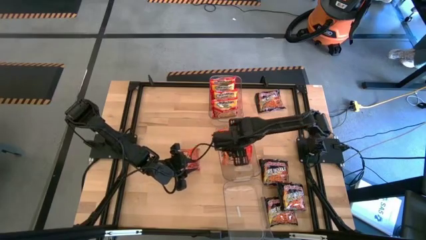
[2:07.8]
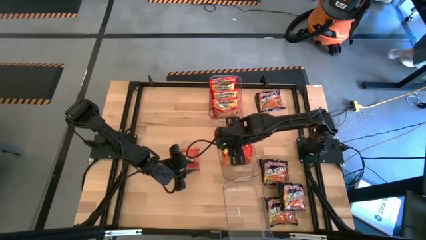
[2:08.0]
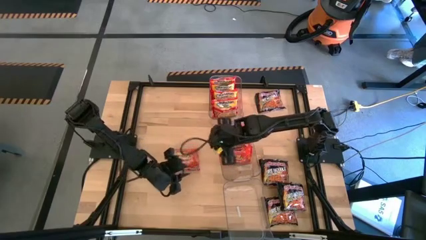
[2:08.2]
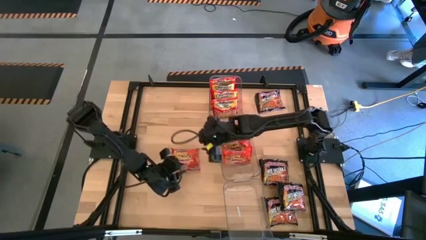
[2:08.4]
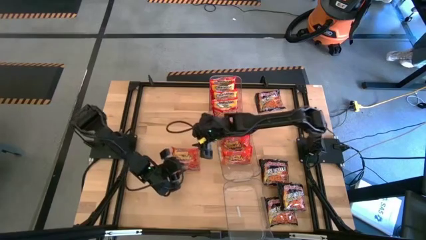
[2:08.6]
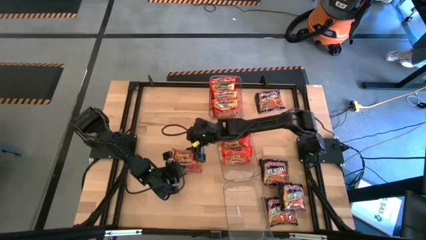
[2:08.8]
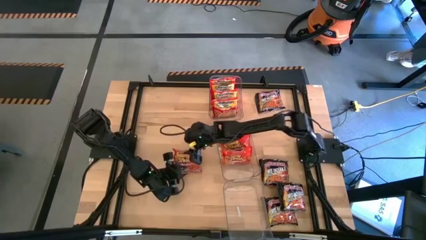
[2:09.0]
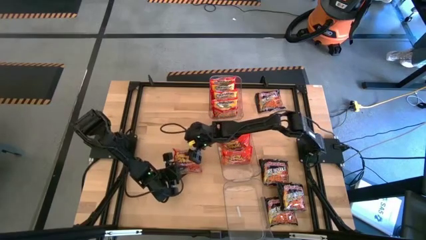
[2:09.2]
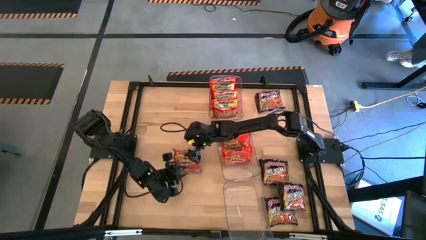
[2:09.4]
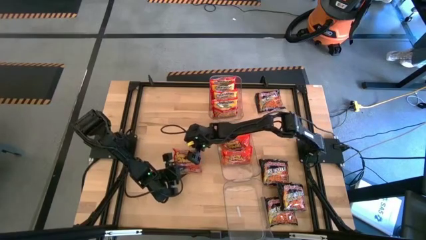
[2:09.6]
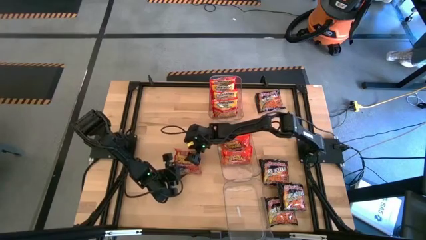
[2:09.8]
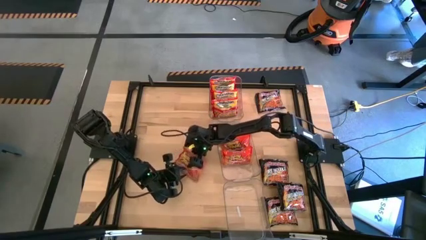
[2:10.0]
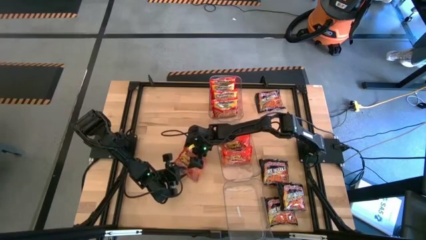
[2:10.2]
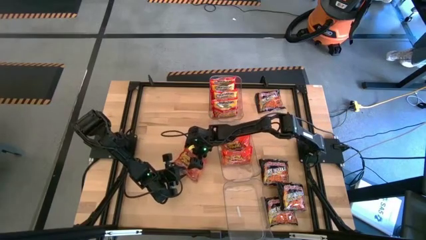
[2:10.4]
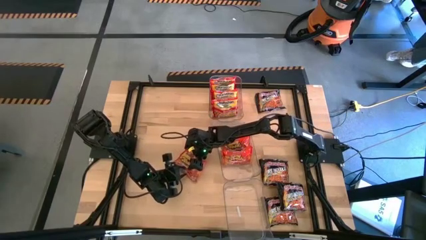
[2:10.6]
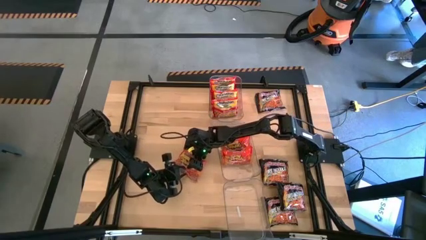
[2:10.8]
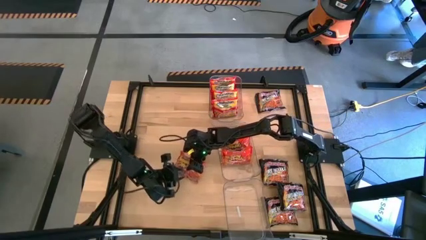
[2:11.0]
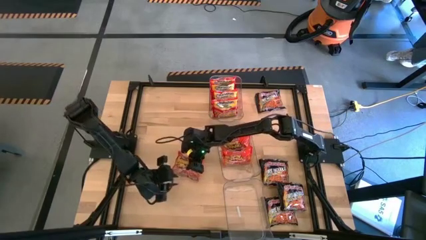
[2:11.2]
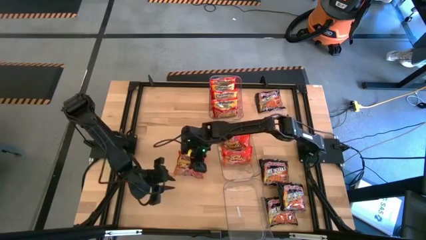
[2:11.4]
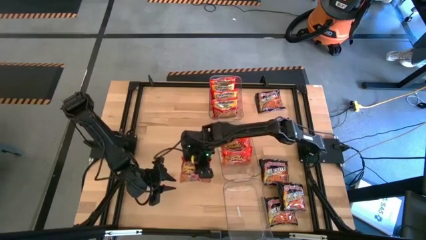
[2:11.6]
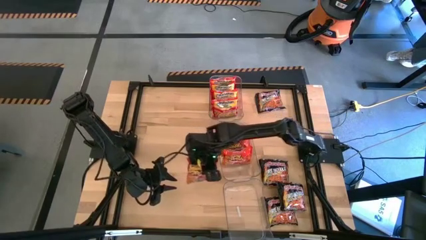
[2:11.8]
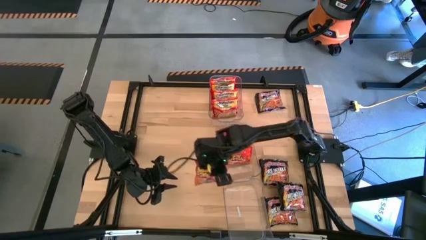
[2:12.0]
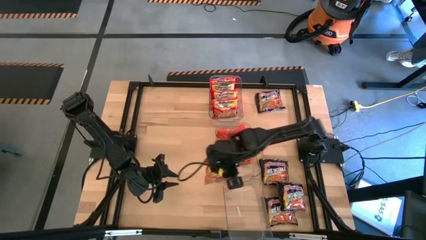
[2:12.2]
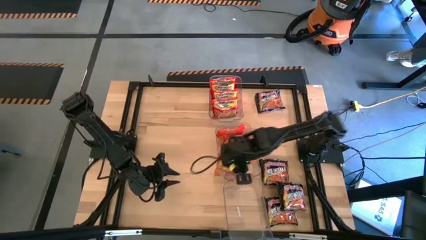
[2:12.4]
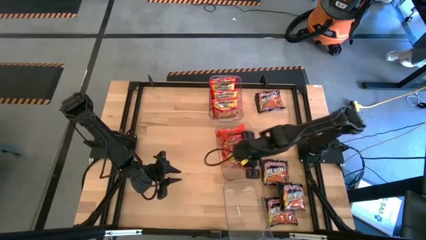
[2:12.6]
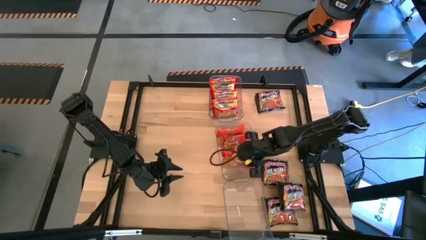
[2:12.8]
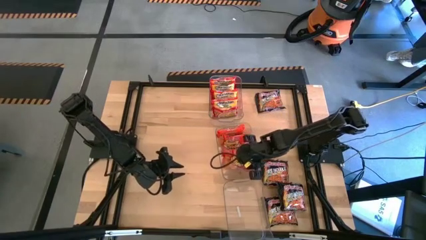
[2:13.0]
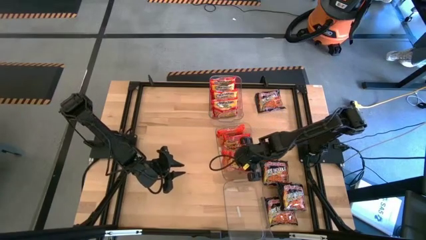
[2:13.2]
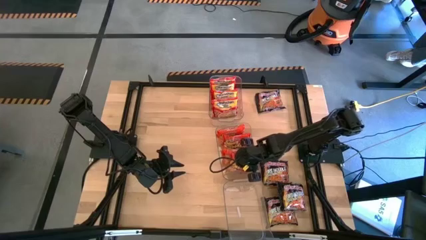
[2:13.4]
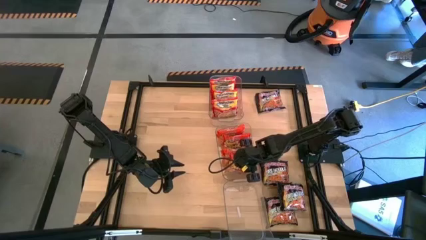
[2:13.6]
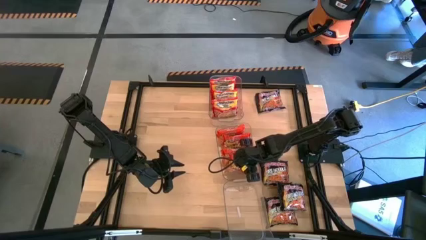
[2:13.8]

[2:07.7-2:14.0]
Task: Sort Maruchan noodles
Put the orange noodle pack into the middle transparent bin

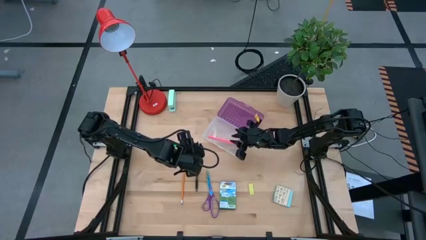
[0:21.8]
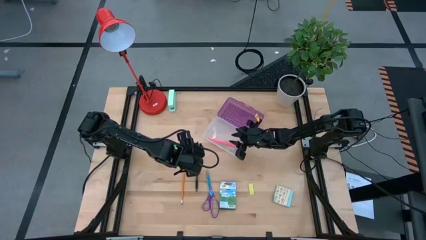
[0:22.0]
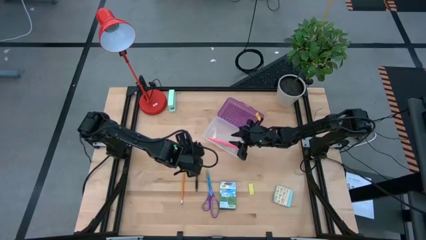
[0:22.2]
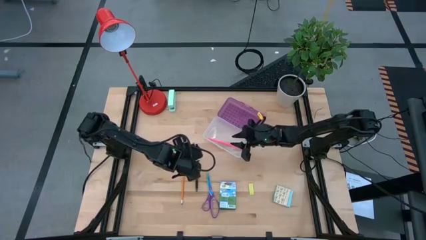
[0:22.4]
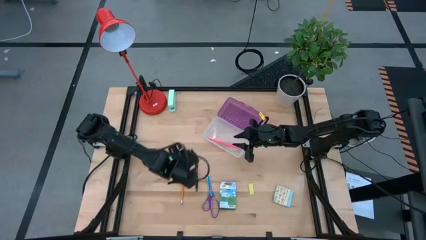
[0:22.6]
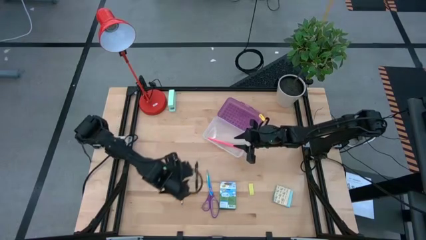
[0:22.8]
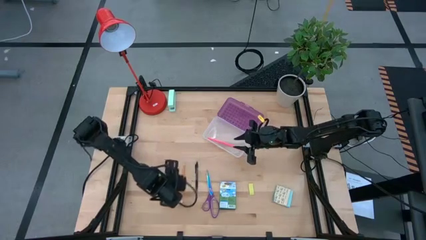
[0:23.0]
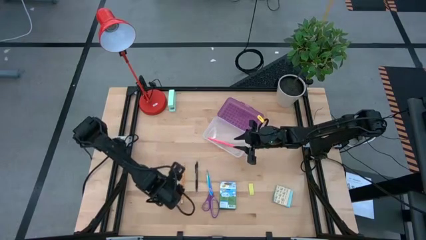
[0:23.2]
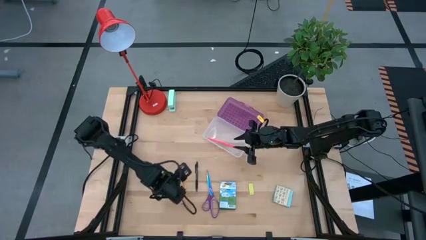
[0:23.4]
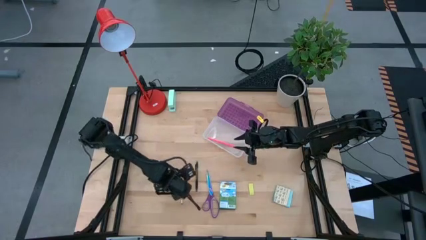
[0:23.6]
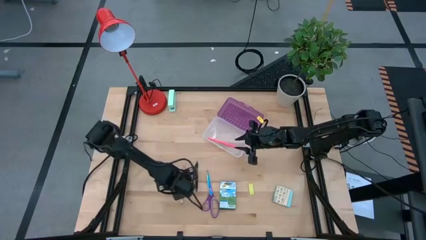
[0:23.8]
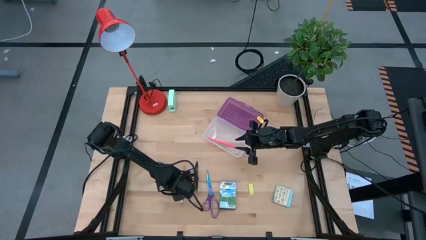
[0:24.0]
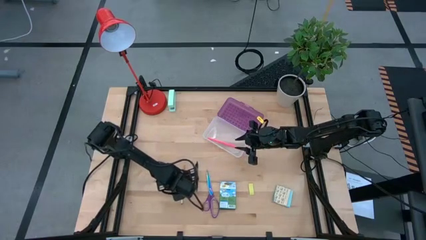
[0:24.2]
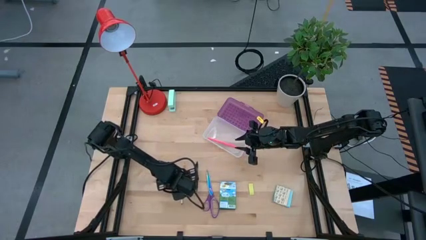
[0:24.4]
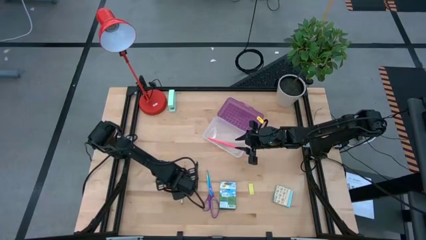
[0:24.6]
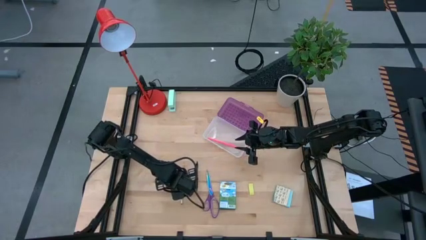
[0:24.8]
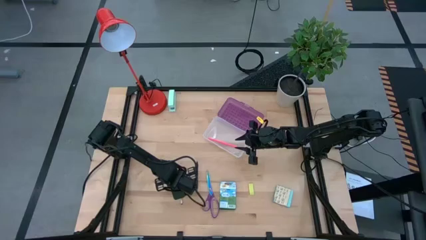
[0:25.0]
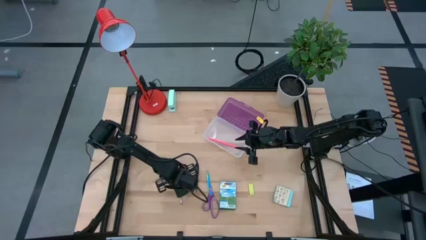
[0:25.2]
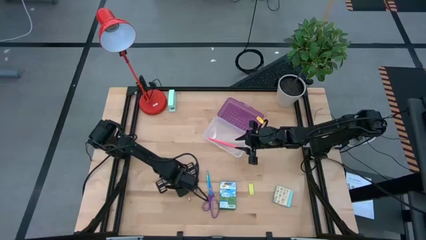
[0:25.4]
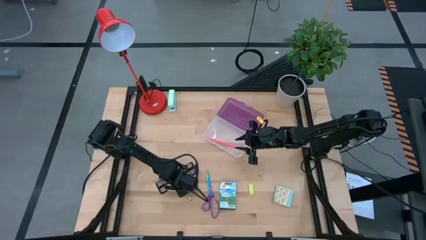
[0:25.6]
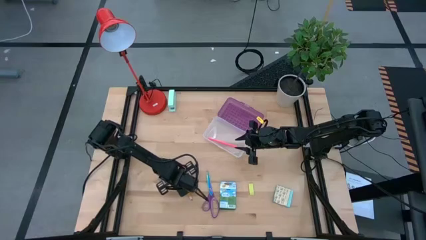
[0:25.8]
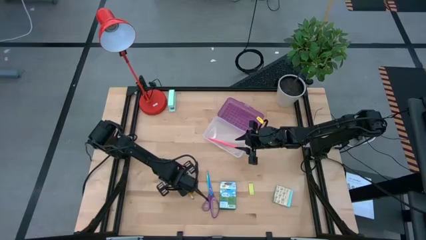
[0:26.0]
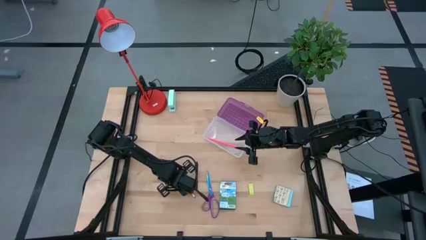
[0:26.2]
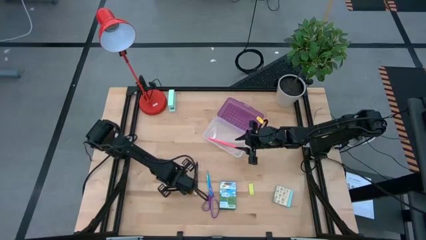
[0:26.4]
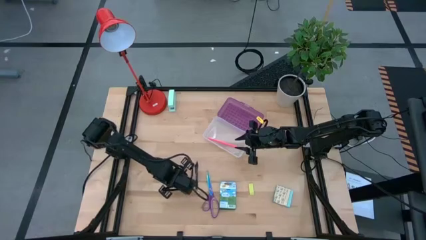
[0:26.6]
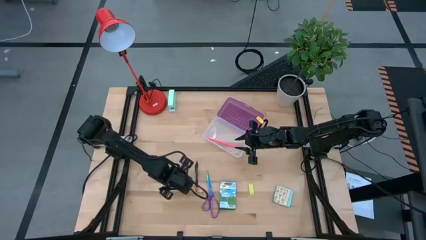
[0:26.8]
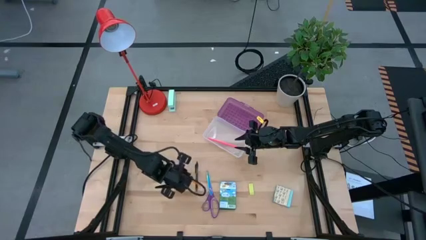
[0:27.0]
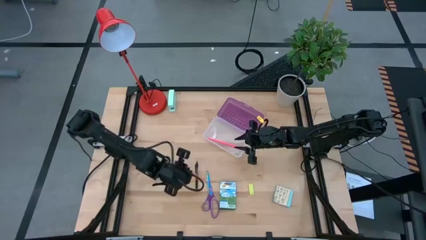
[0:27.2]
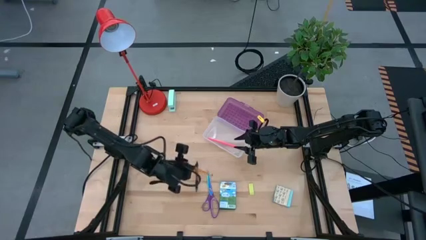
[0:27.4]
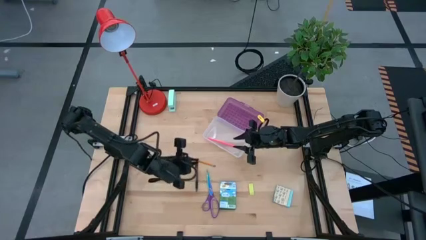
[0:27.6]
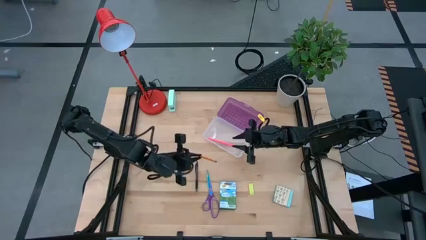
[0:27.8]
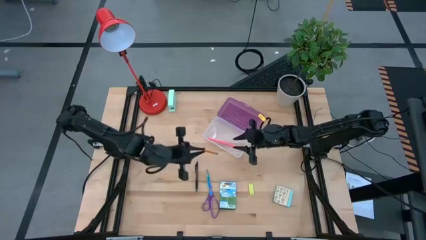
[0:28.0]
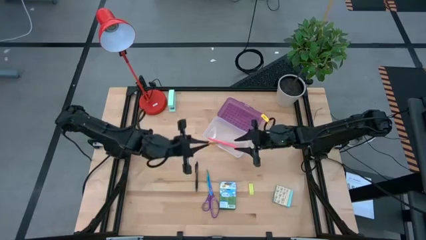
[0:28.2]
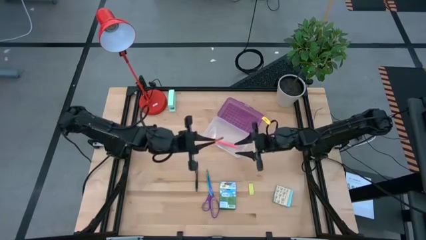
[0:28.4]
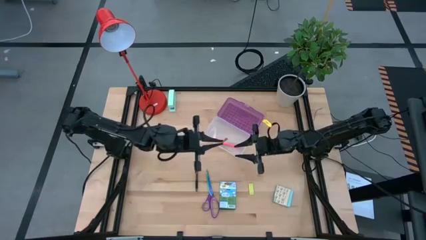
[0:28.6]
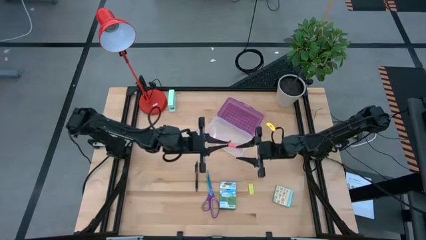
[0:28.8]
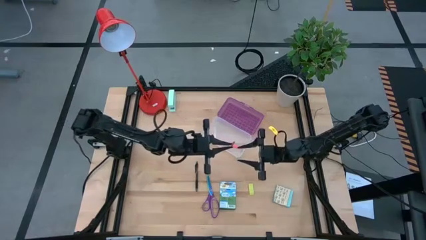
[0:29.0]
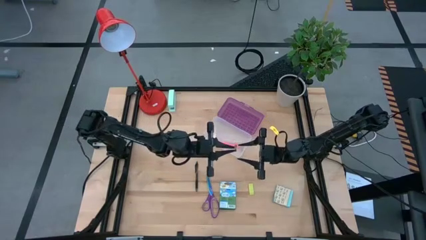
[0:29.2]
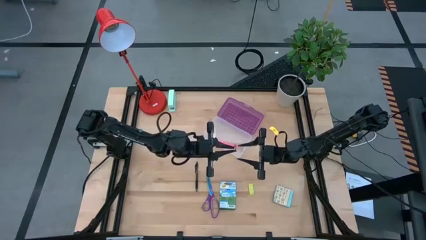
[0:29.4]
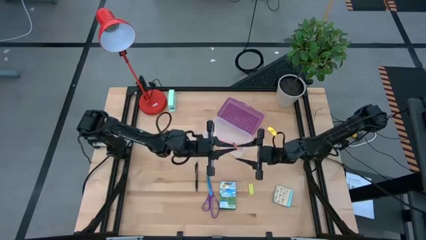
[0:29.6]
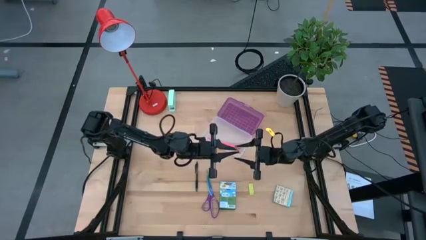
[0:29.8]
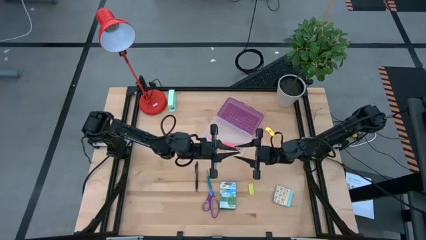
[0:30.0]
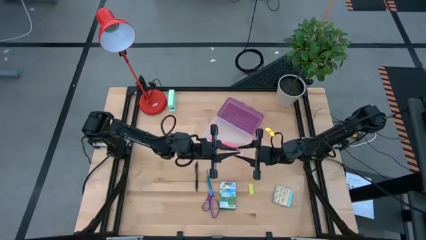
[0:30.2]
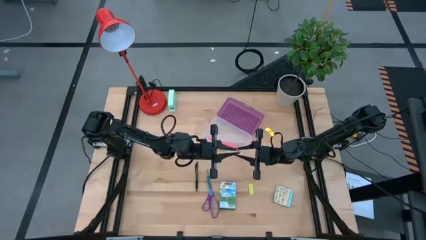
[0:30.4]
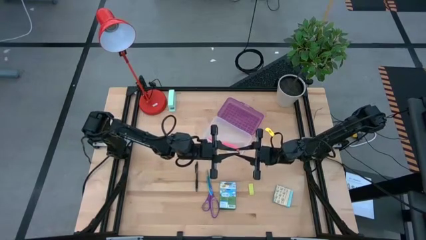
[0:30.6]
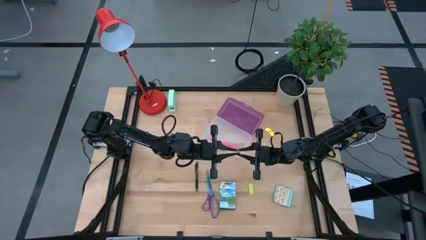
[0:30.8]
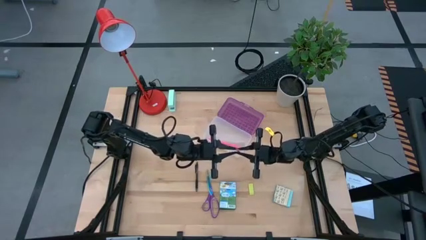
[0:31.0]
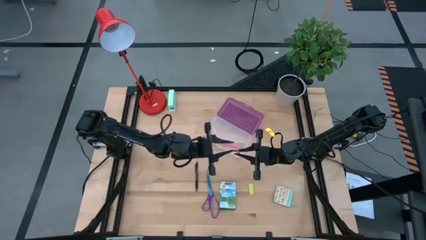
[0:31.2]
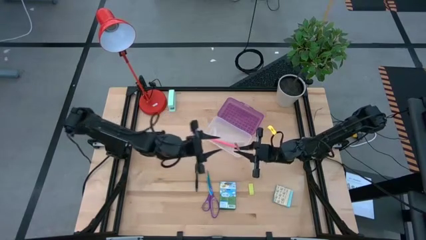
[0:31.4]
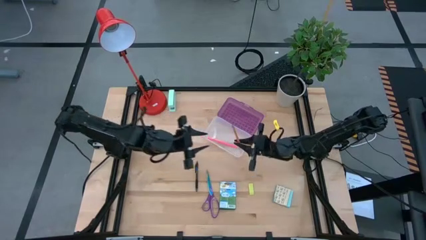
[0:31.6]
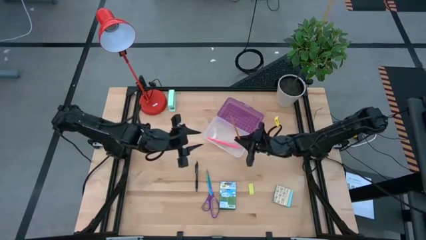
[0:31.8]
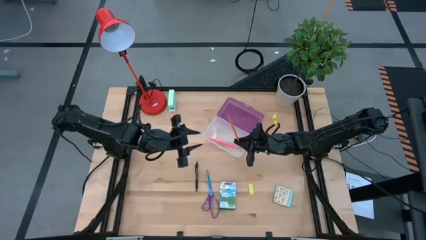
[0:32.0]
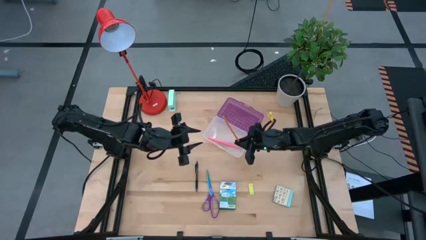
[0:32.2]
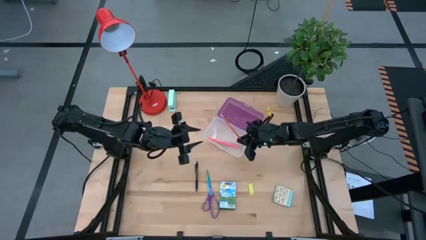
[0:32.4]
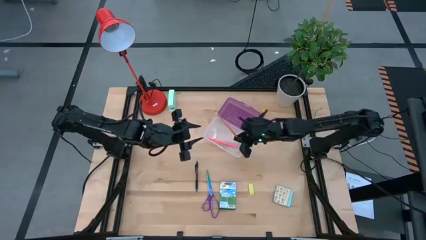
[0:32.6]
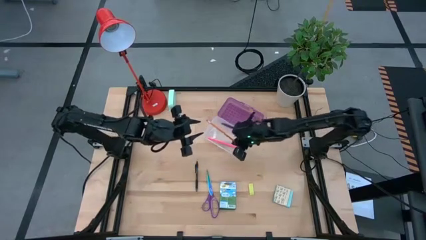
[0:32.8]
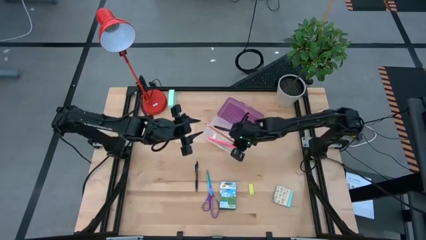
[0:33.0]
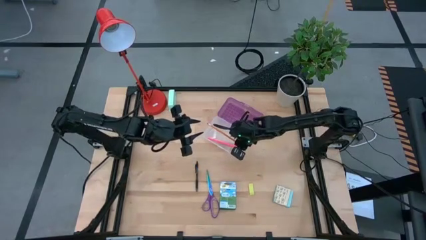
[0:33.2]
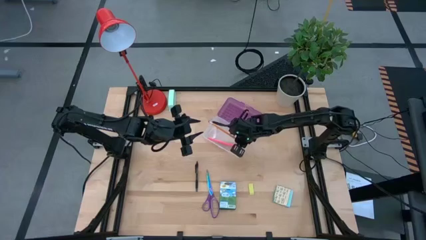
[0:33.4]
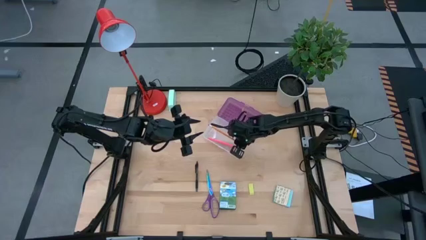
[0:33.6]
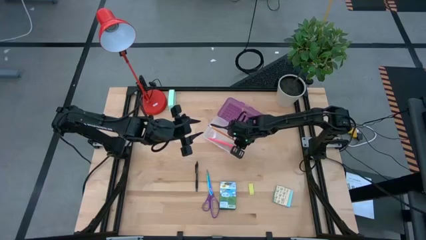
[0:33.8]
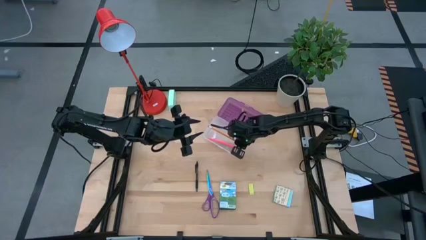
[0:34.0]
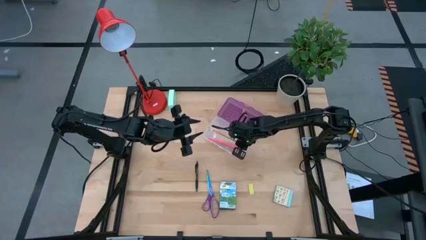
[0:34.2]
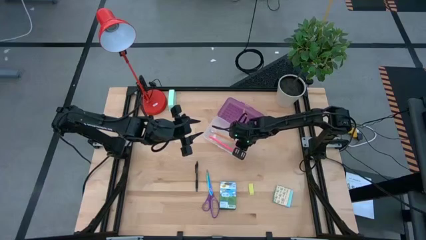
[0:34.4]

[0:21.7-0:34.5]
Task: Pack school essentials
Put the orange pencil into the purple supply box
